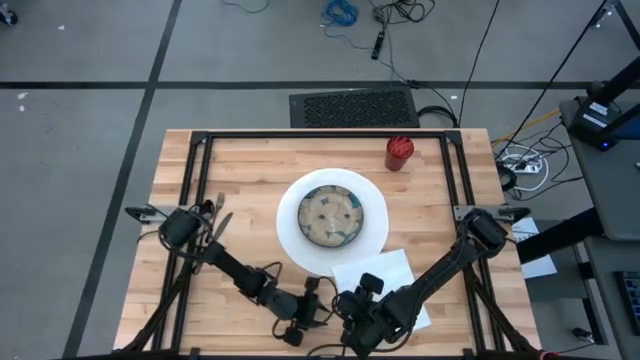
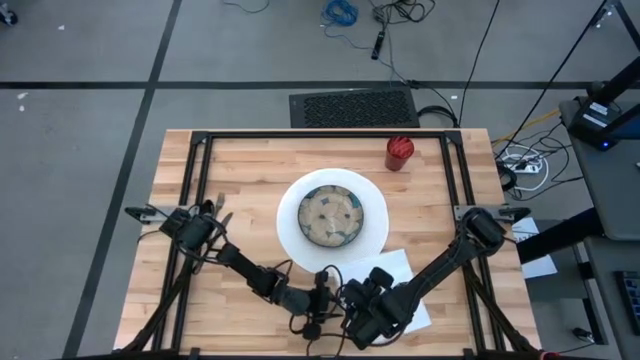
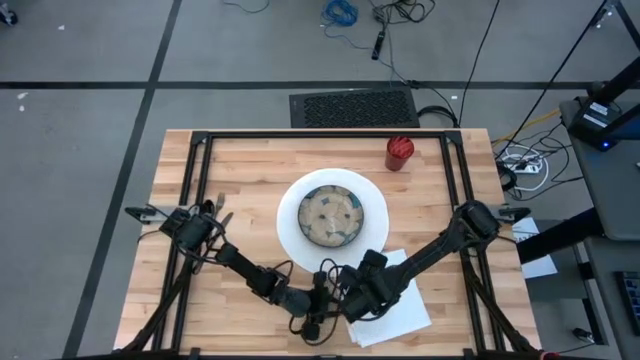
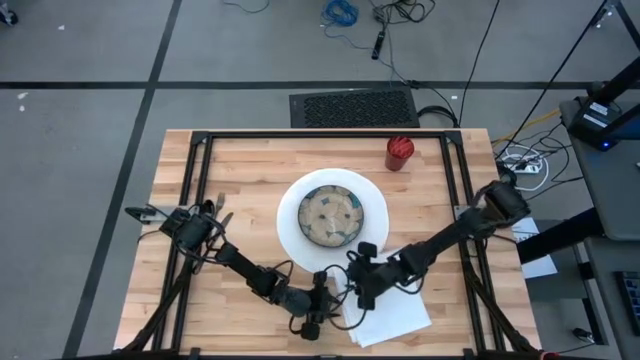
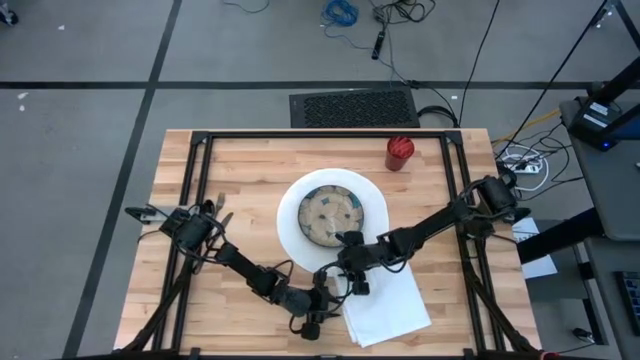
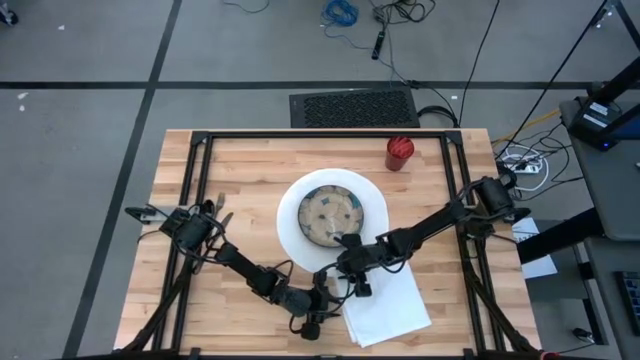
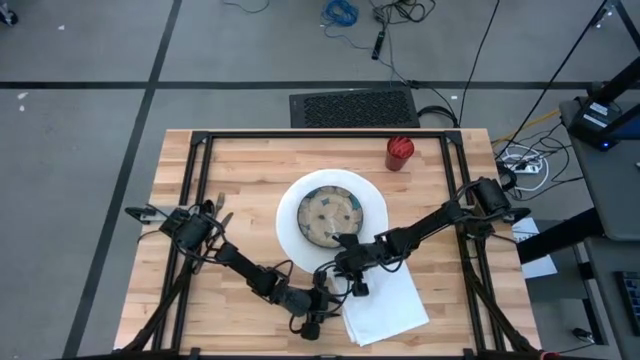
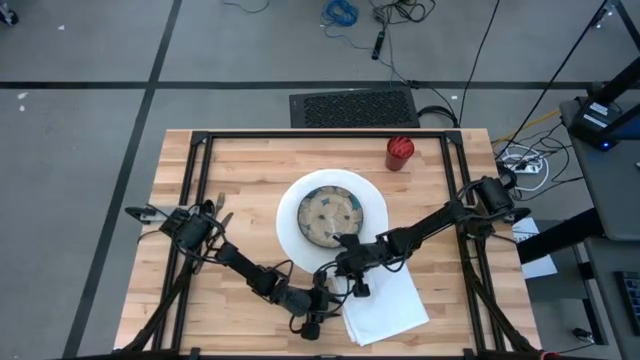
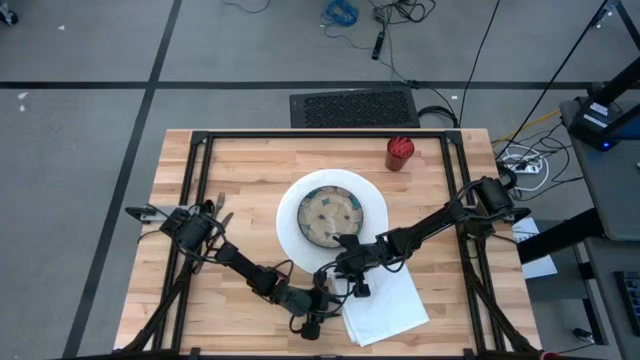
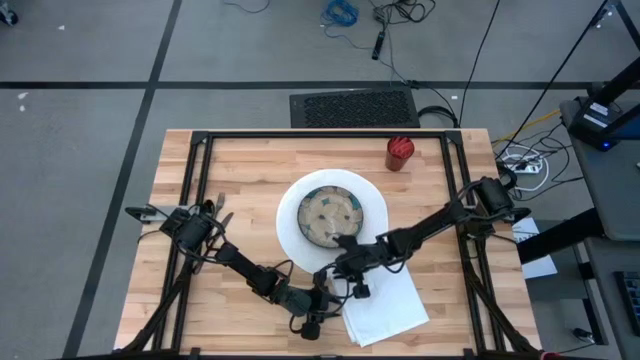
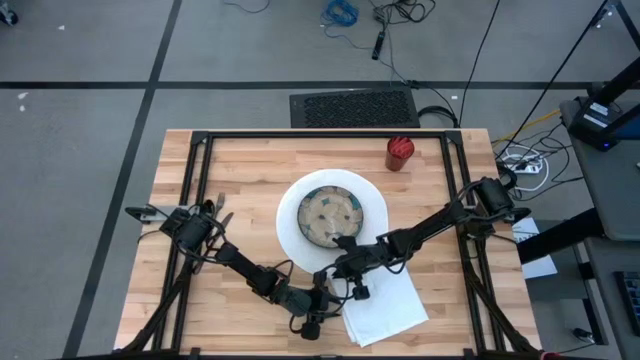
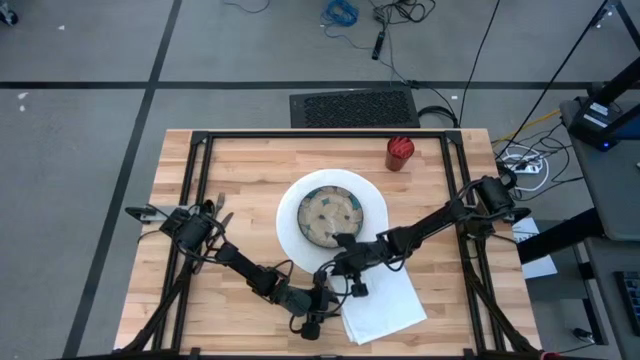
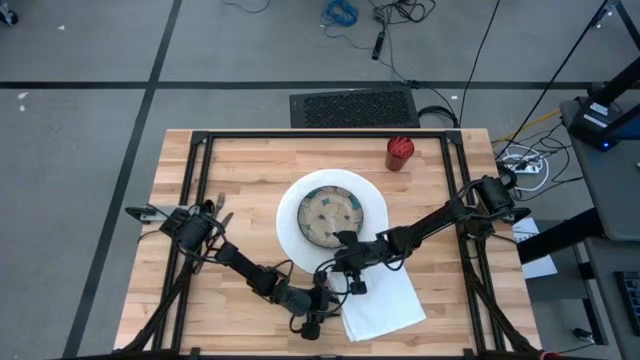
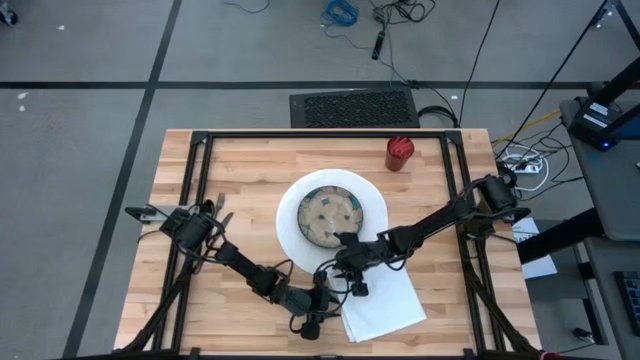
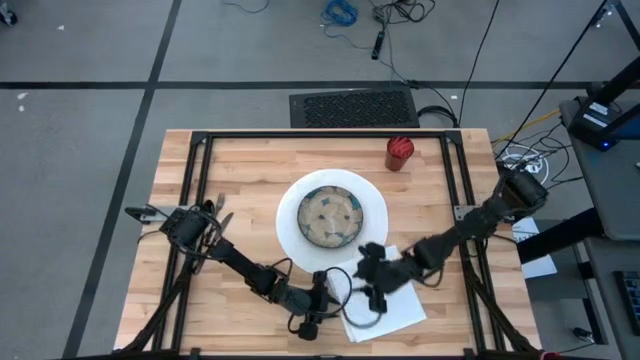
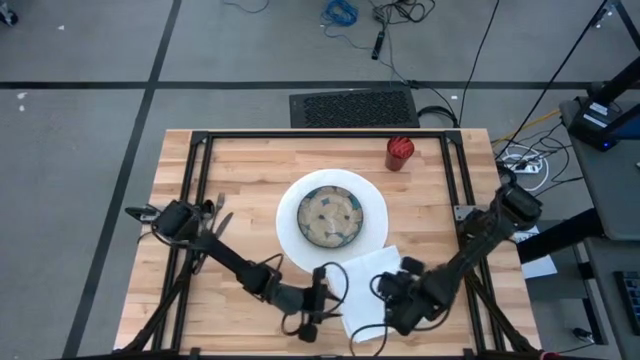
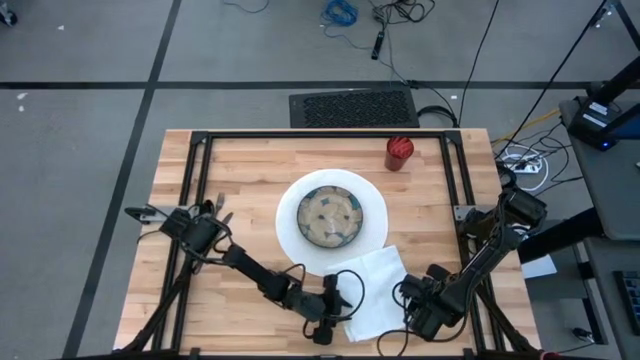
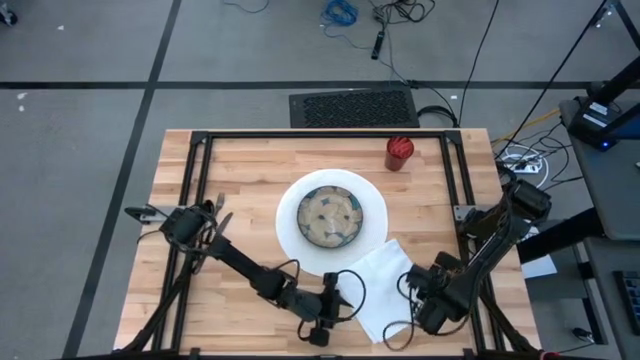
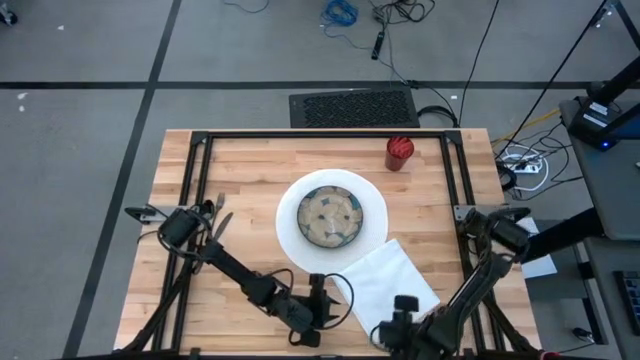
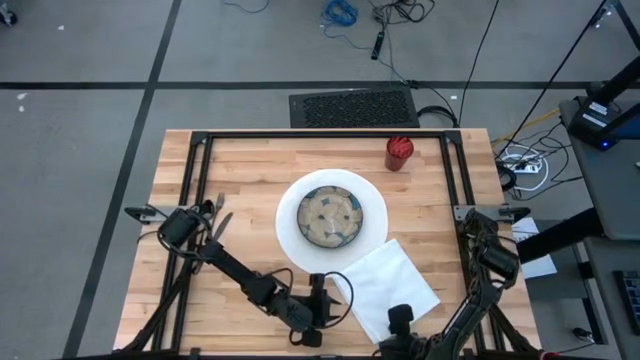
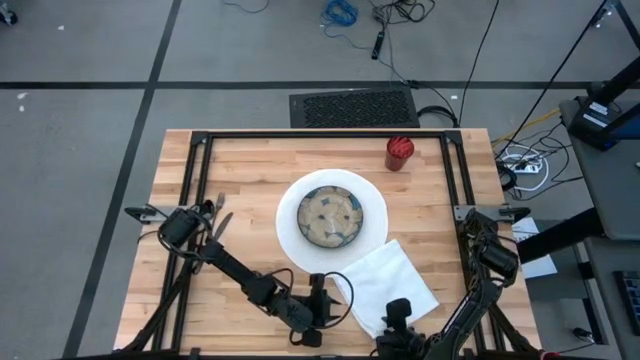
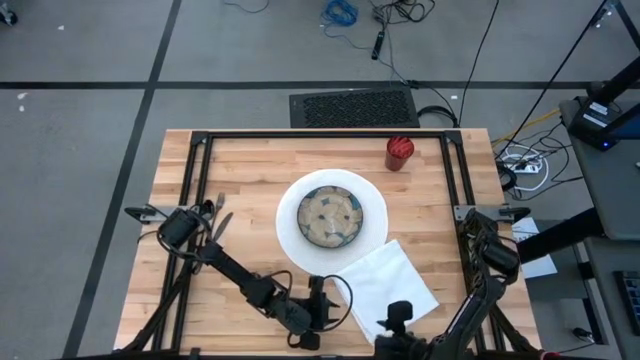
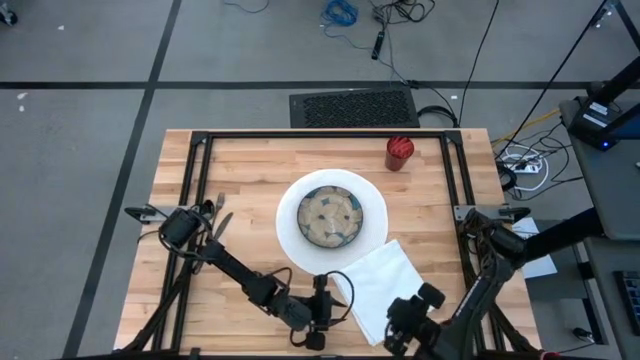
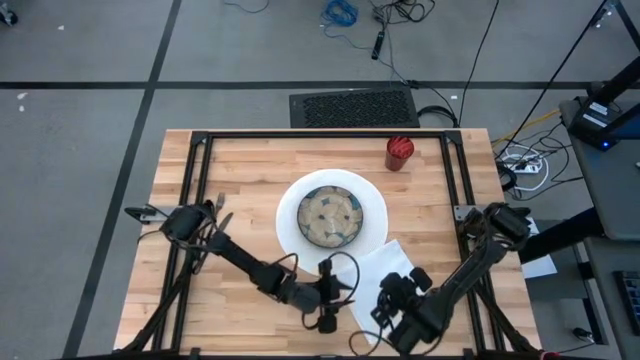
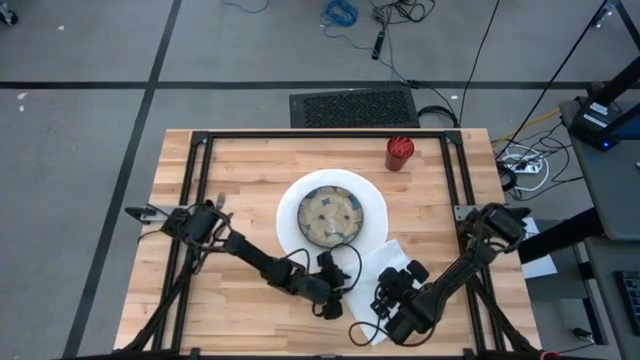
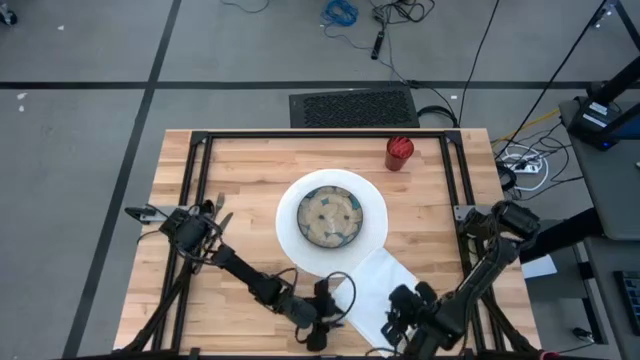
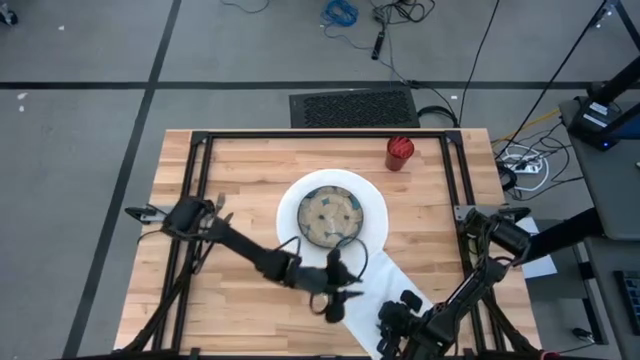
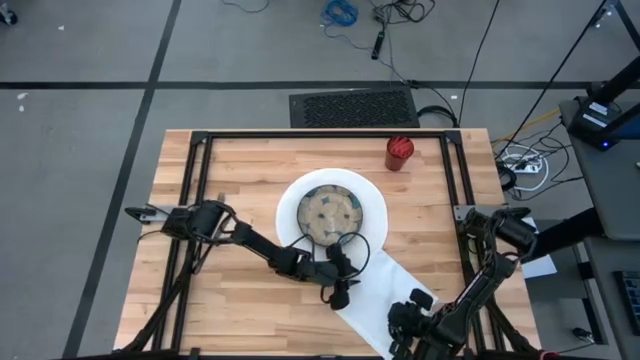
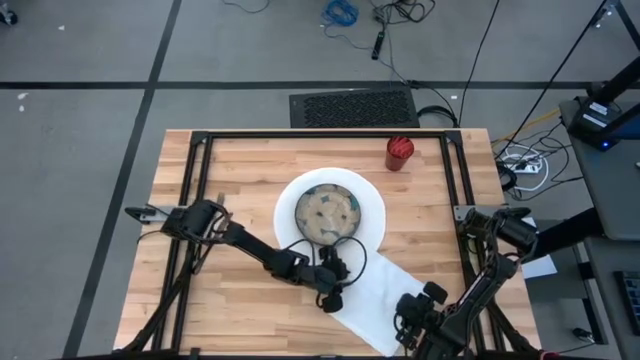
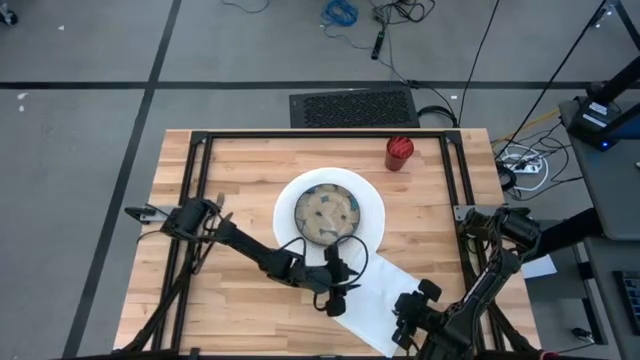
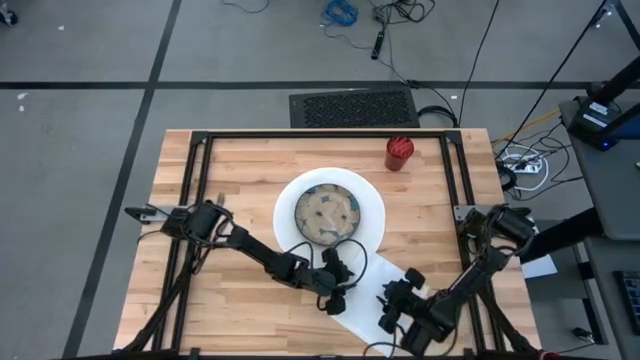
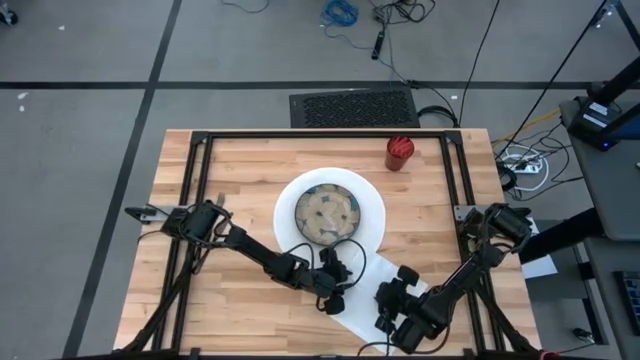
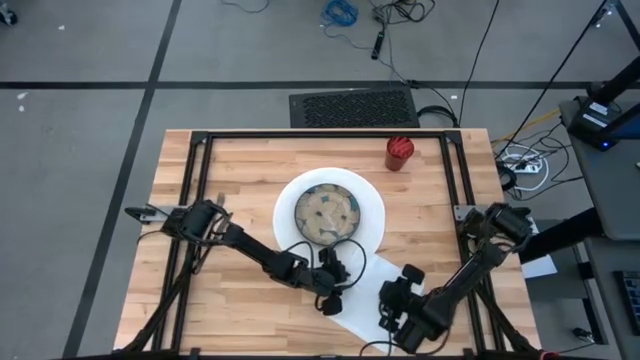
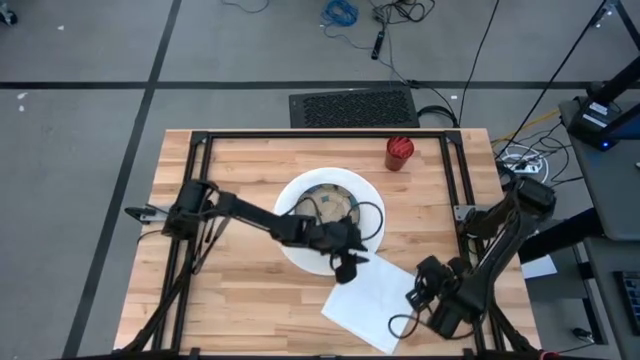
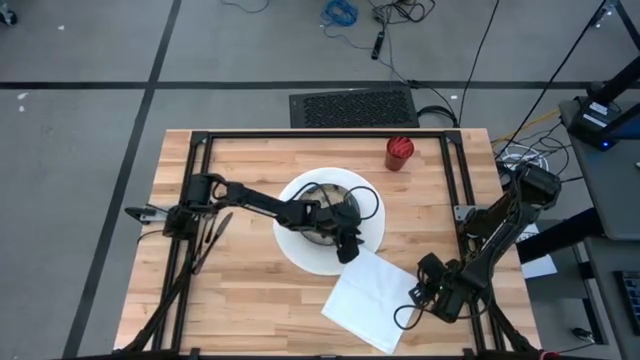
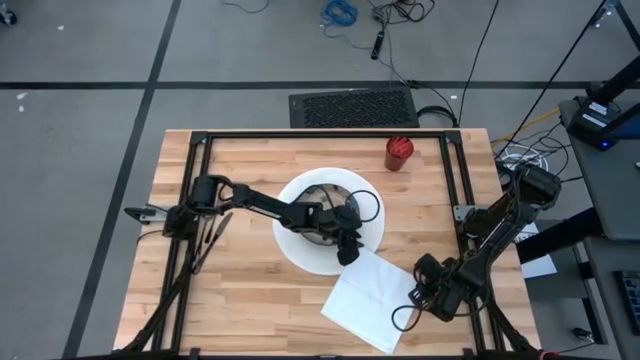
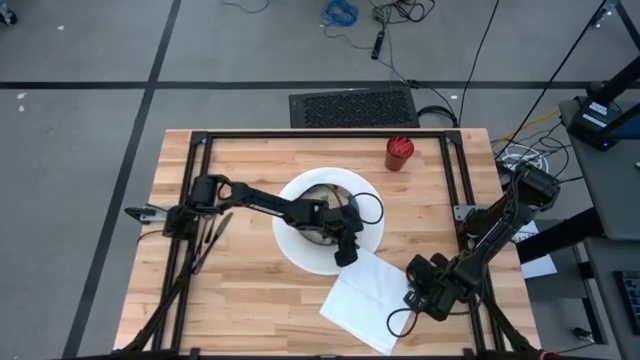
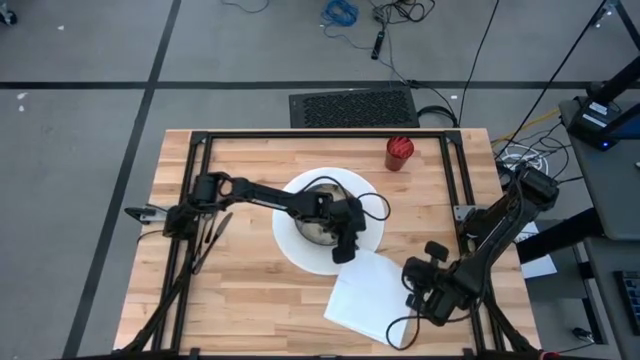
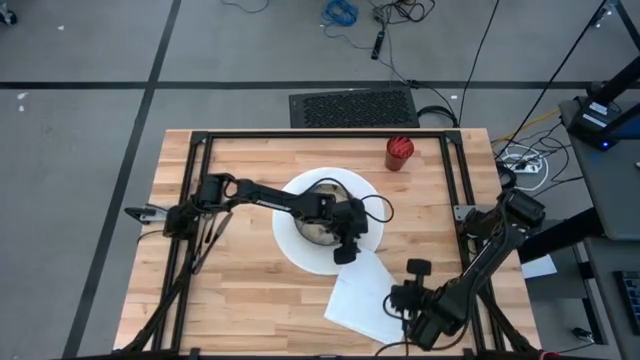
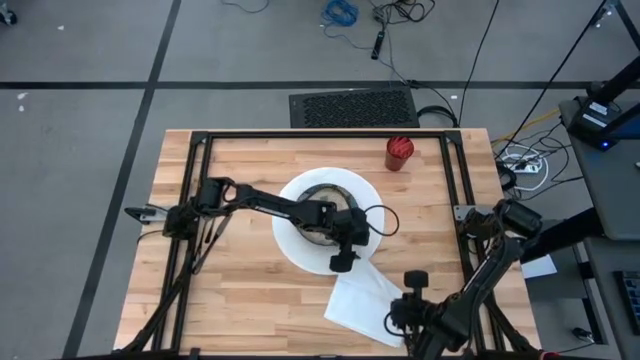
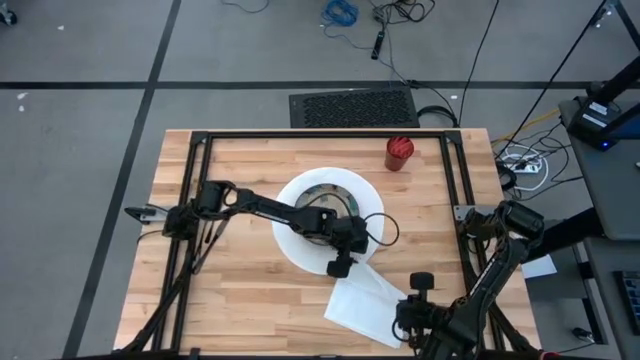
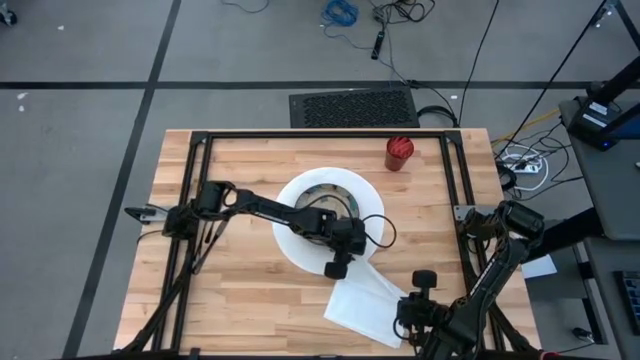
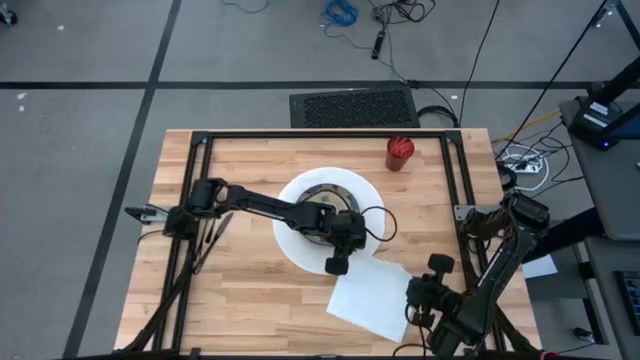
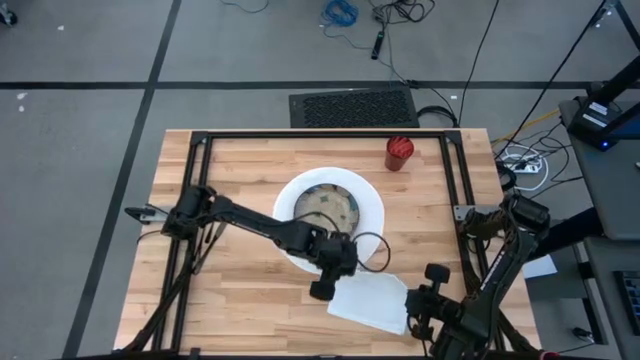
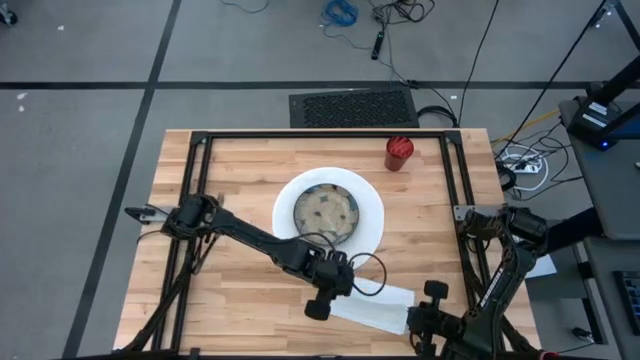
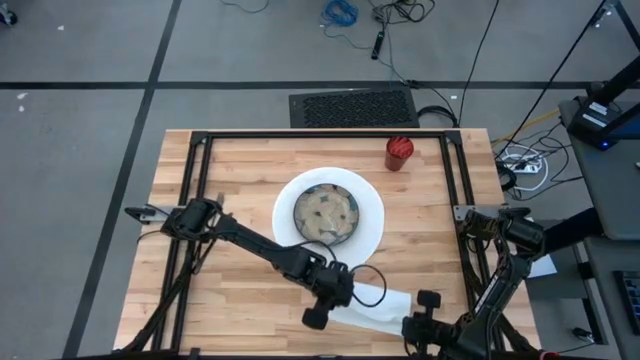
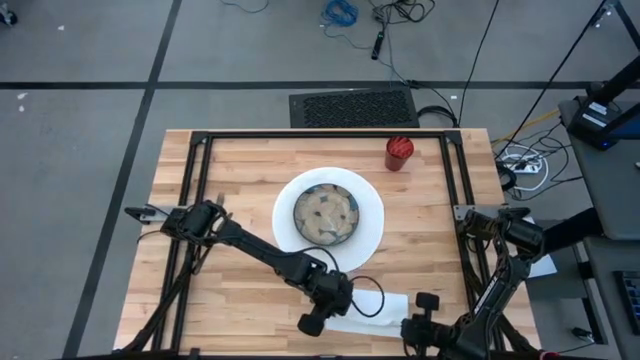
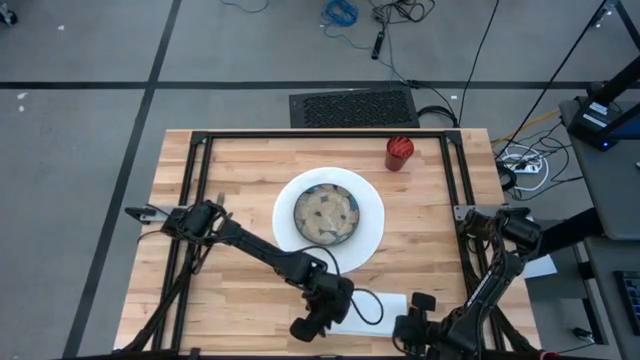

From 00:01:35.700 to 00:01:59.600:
Task: Set table place
Fold the white table napkin
